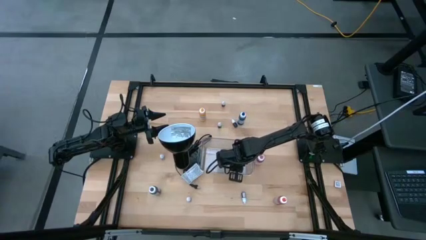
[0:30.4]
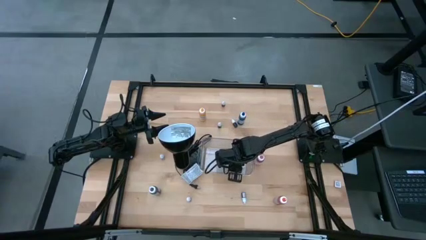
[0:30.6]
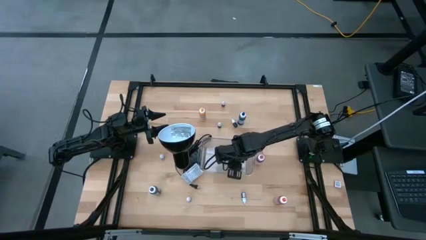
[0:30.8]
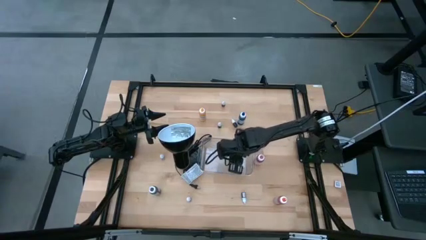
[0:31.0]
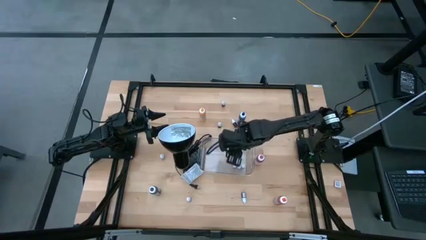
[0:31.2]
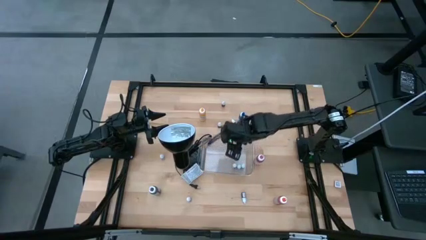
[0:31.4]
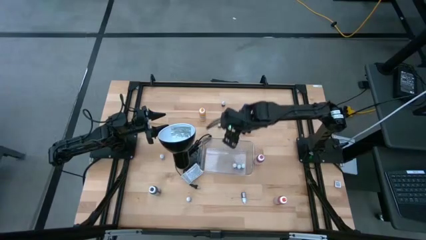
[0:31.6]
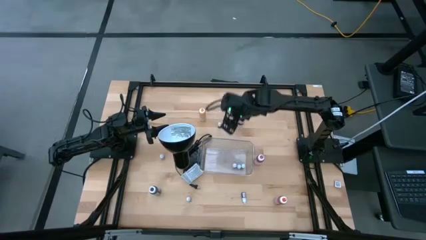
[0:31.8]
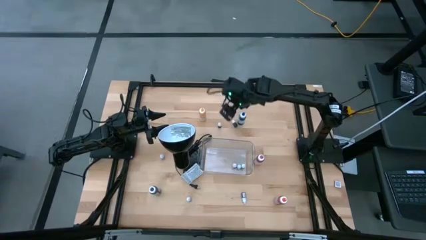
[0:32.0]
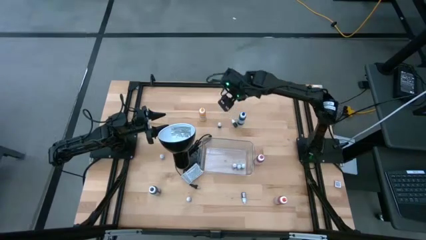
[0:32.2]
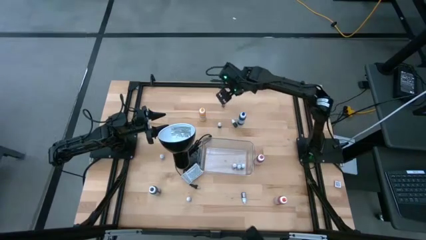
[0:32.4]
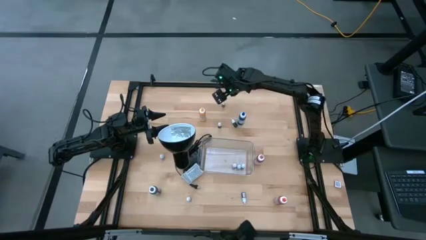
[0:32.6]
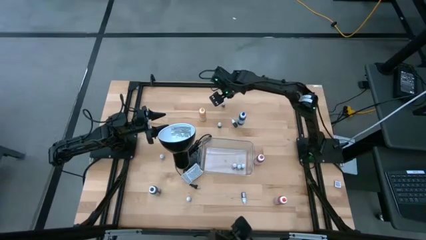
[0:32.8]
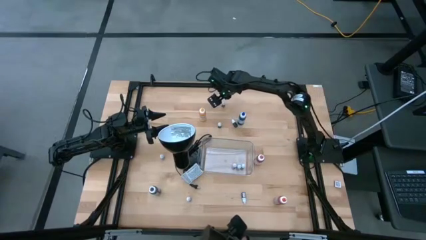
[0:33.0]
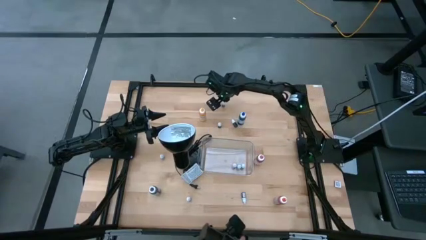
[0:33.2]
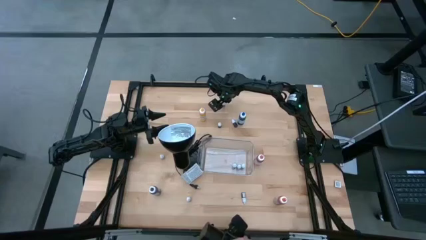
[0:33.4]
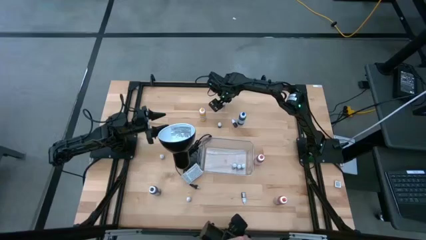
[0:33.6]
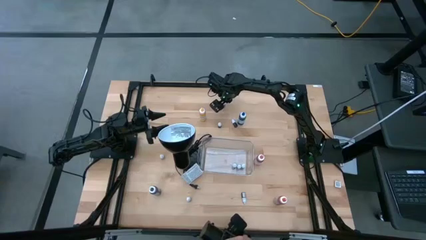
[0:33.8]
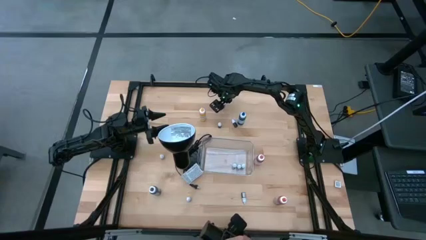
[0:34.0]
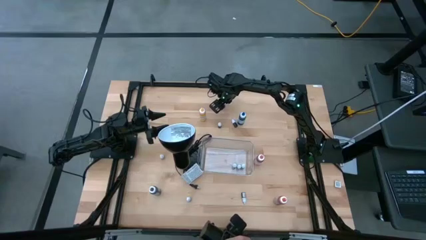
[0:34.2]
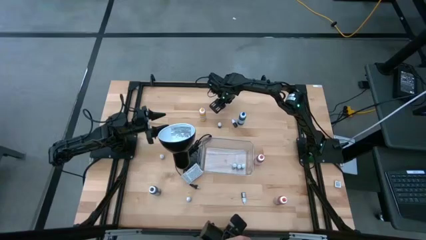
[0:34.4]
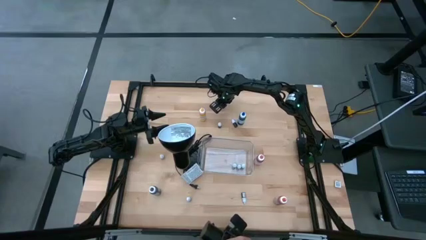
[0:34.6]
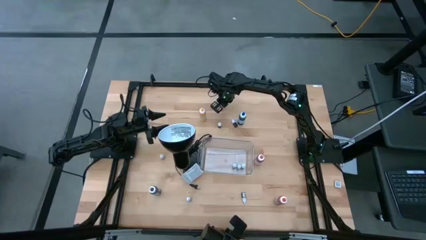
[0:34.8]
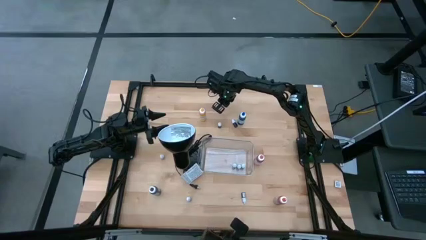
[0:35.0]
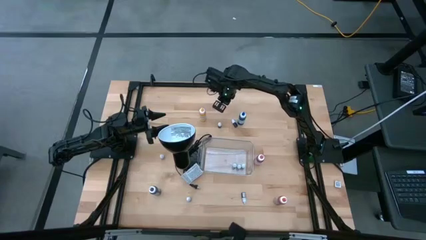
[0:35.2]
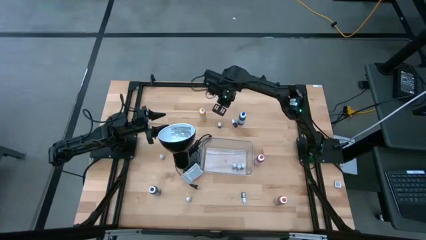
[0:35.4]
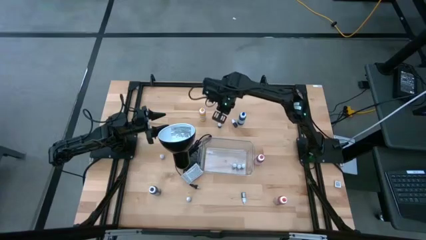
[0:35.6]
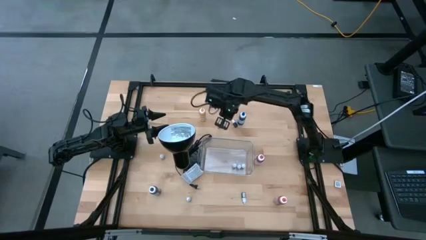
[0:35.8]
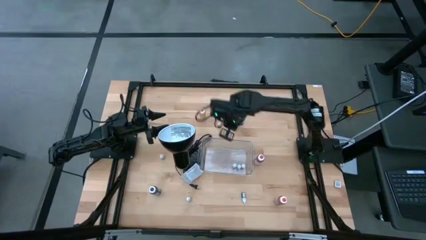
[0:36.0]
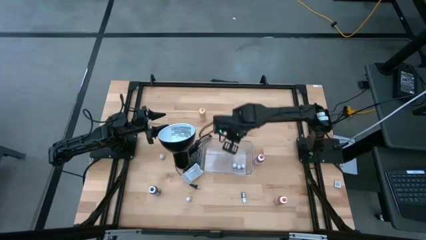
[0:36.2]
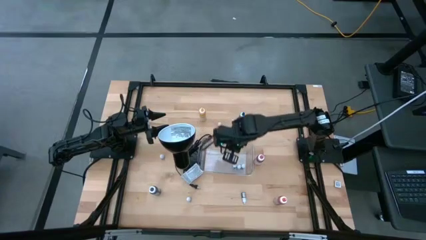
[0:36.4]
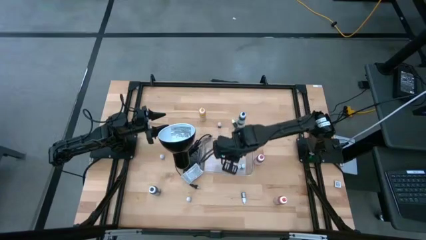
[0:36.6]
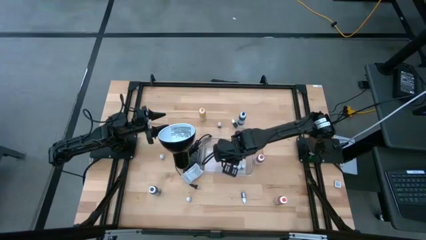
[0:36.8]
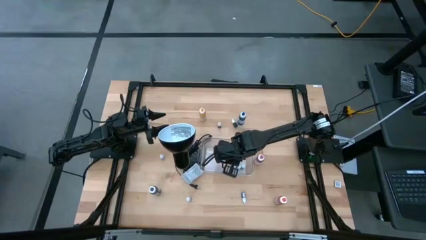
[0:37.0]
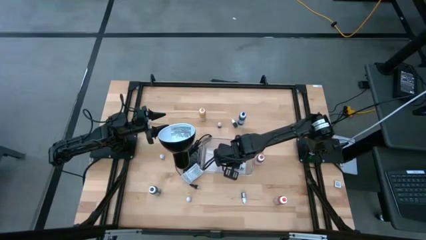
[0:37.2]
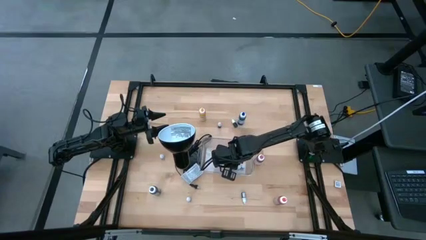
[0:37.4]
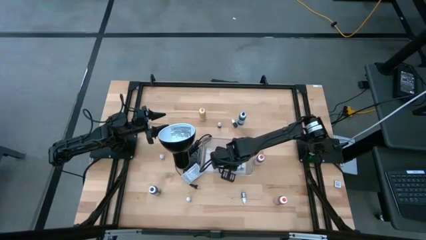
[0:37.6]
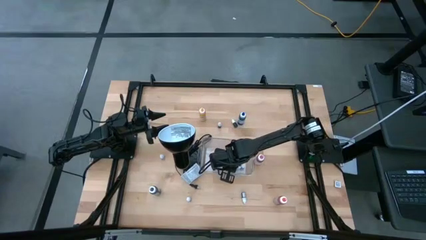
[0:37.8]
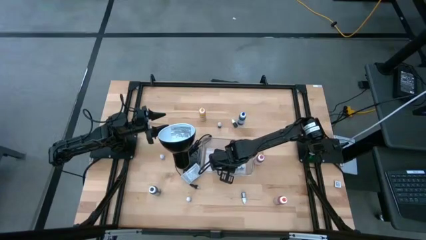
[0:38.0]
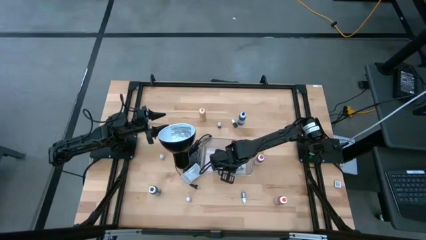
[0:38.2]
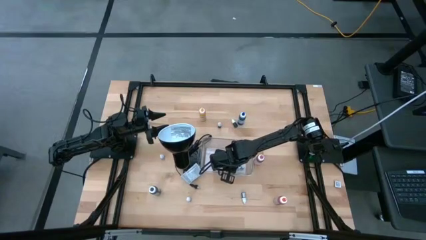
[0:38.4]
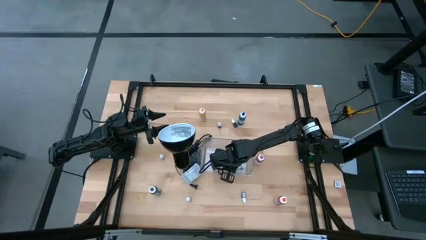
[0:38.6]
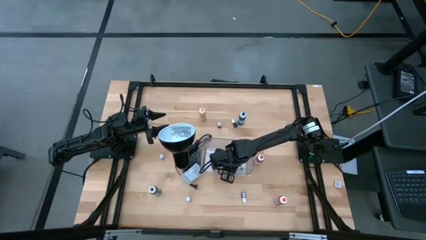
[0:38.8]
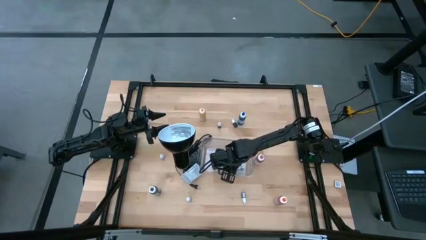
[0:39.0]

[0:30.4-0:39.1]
Task: Pick & Place food coloring
Put the small red food coloring bottle into the transparent bin

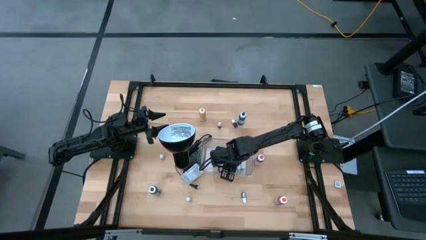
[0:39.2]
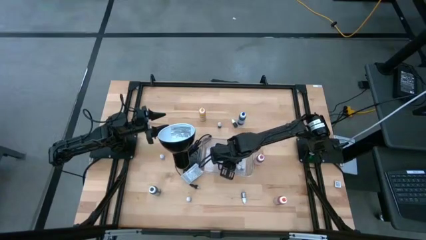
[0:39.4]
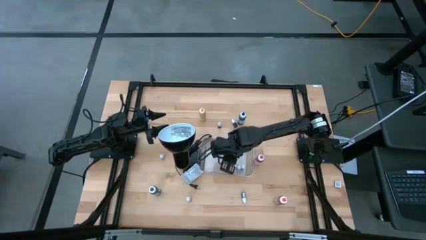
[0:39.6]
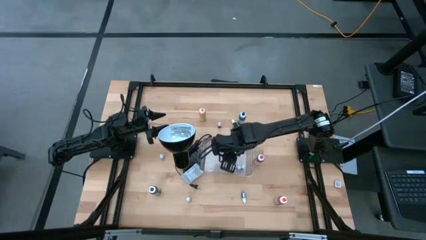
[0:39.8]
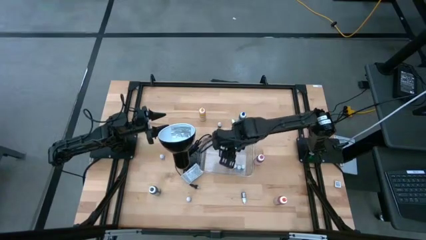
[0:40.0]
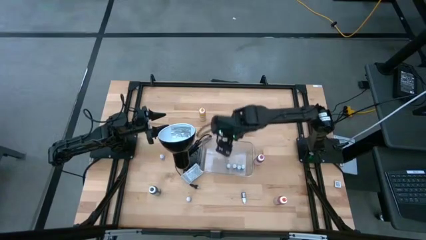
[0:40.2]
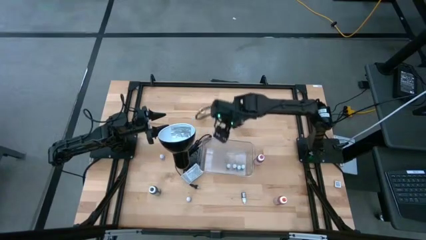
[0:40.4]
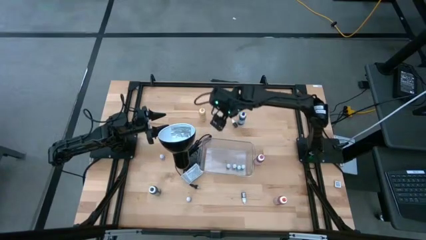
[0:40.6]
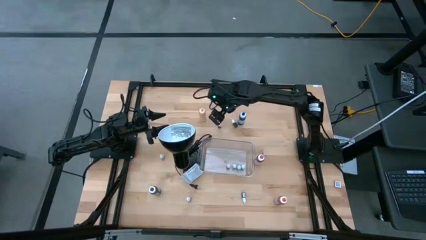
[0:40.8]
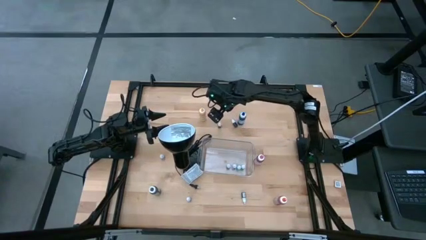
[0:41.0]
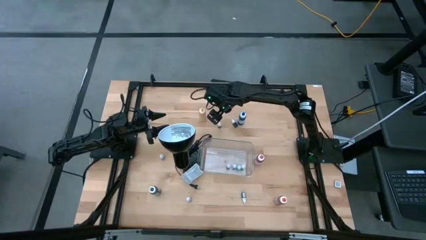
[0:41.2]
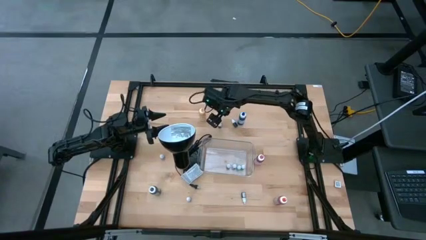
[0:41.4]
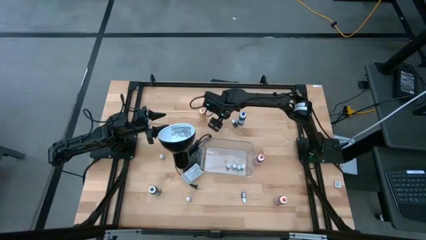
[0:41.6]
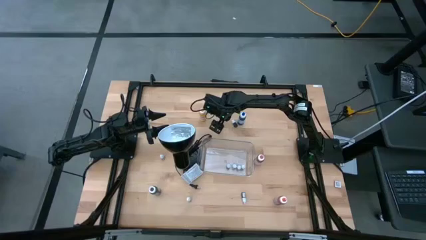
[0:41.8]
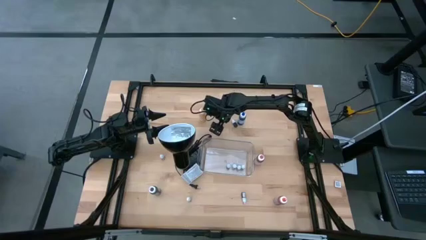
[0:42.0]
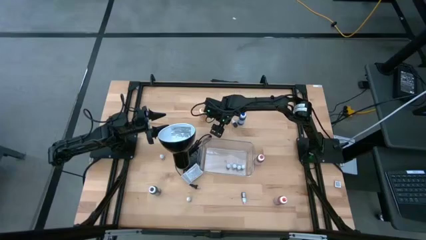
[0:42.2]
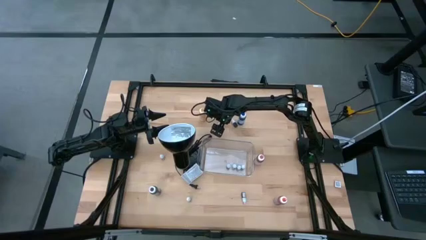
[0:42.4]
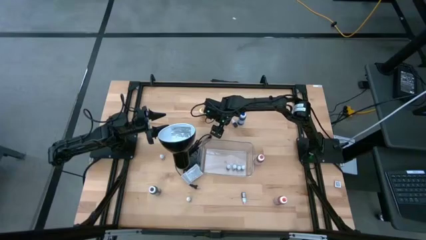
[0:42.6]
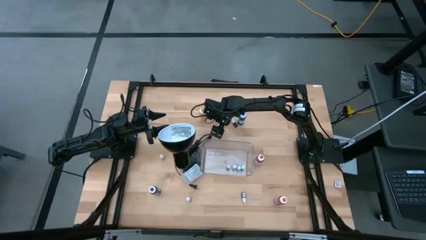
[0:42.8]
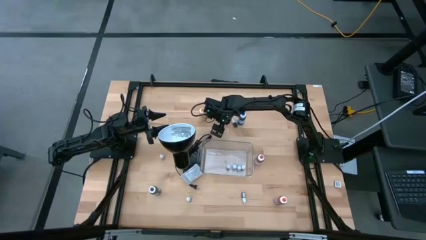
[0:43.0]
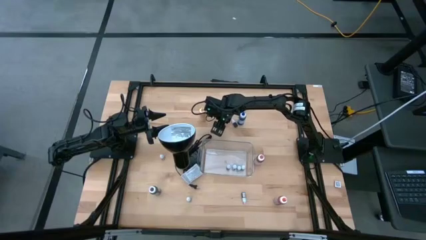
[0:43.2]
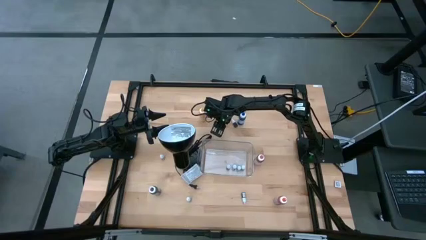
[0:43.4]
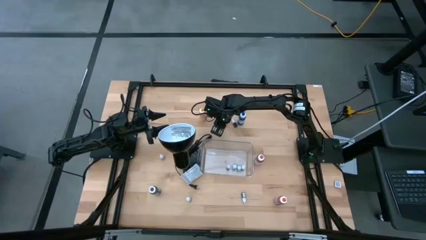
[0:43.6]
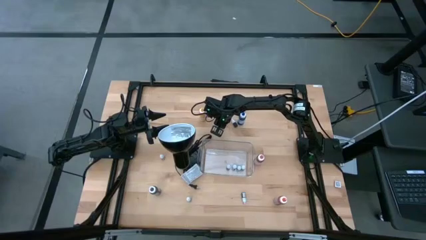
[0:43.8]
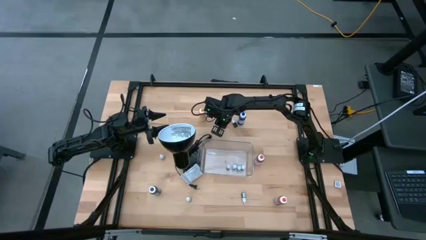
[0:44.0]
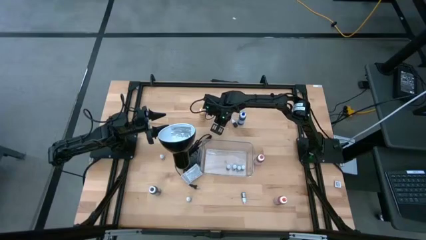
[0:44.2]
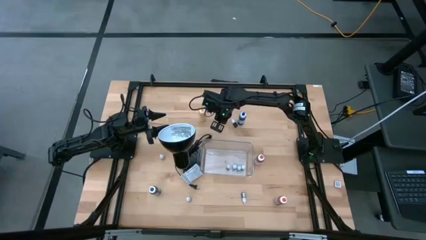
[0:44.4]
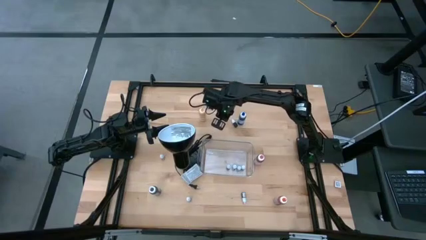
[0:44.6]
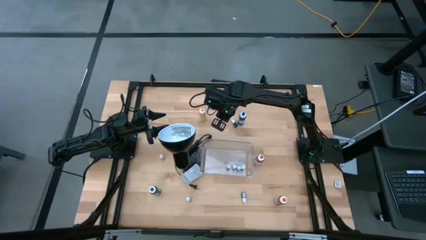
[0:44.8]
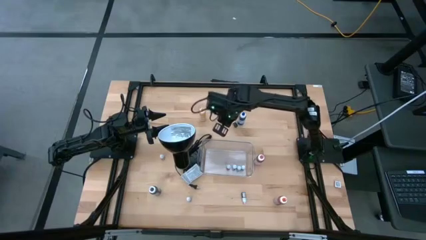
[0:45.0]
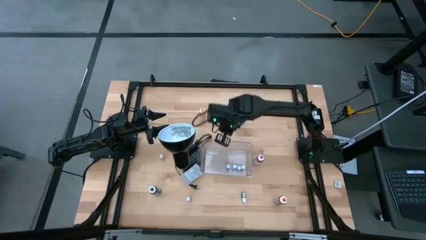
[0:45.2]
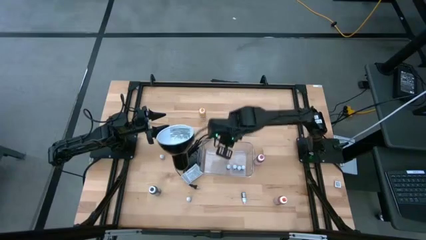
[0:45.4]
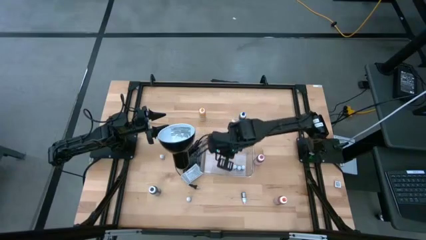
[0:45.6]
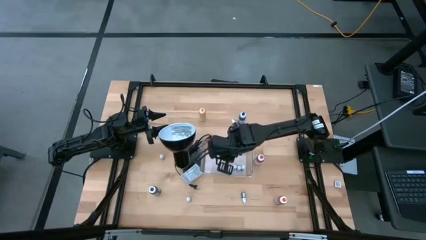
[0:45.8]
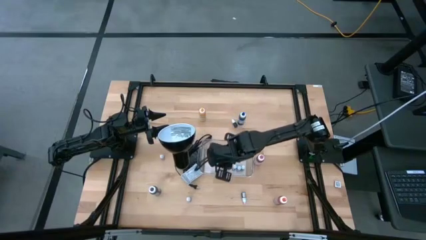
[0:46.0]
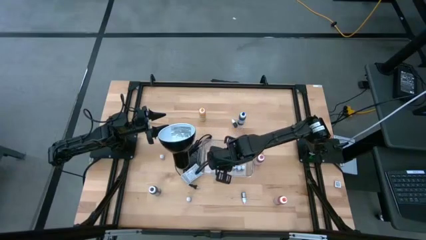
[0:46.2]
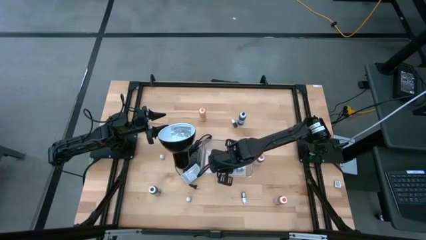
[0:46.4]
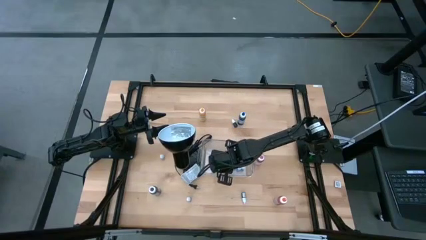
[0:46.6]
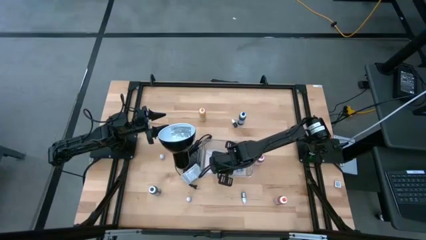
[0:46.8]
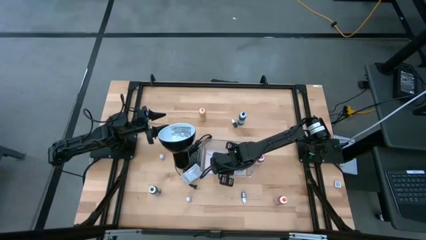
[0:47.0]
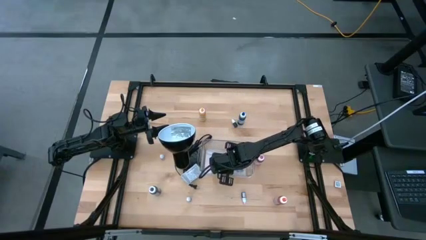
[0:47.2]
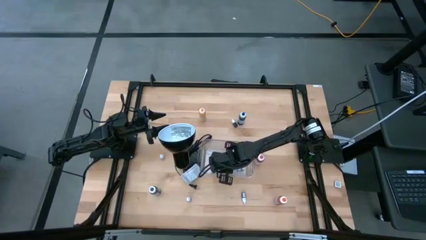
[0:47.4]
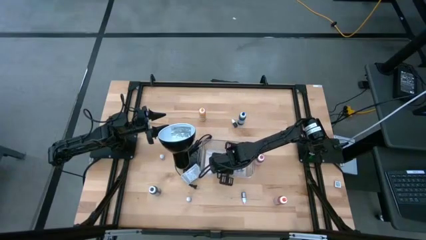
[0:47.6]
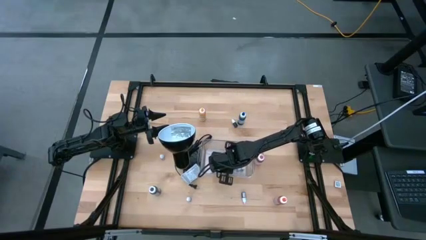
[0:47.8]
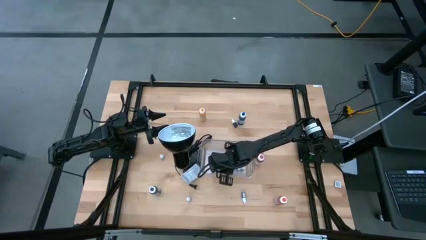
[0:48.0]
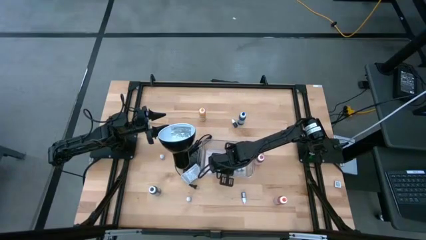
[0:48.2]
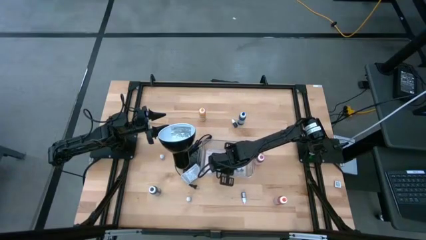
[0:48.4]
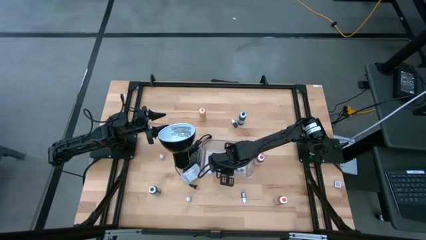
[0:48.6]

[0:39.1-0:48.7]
Put the small black food coloring bottle into the transparent bin
